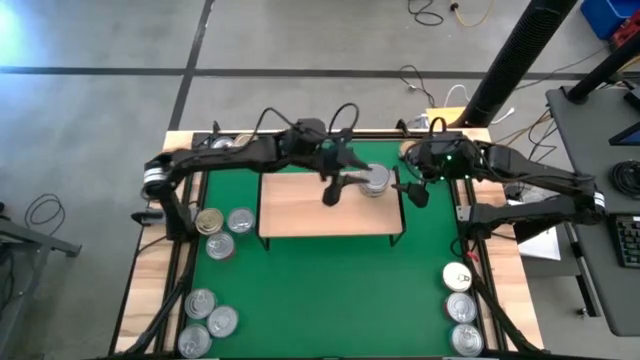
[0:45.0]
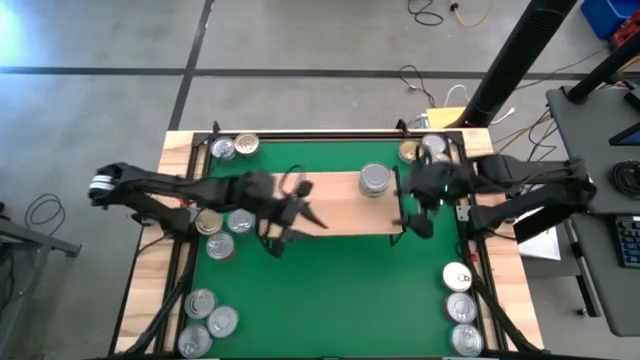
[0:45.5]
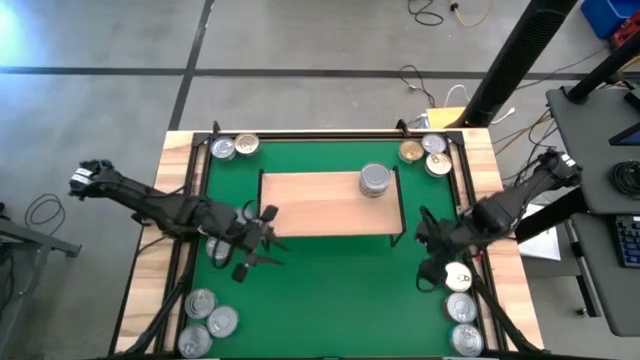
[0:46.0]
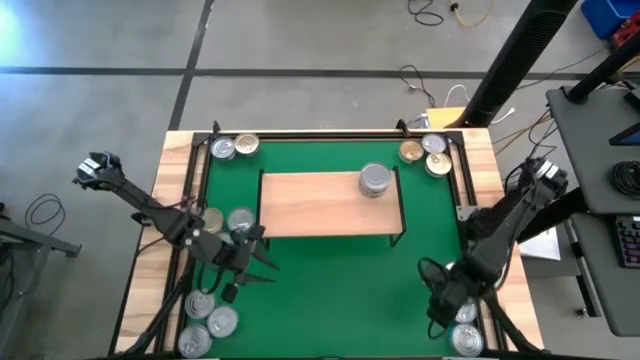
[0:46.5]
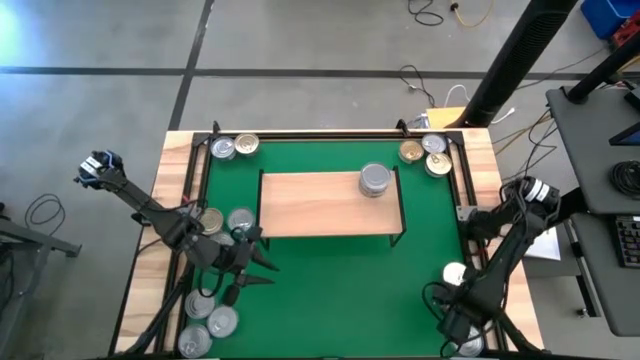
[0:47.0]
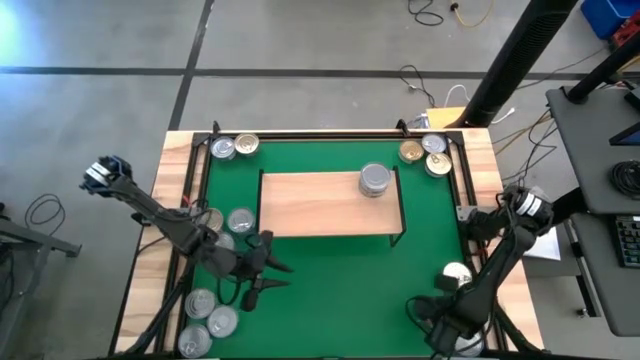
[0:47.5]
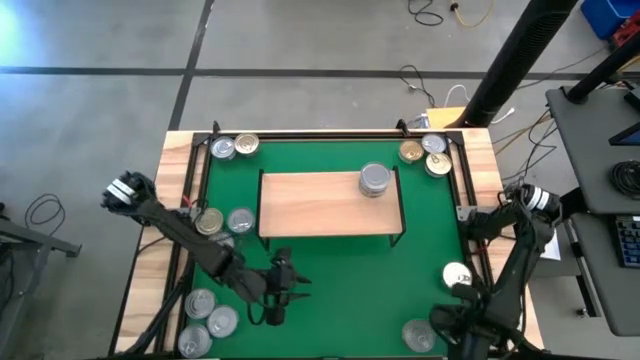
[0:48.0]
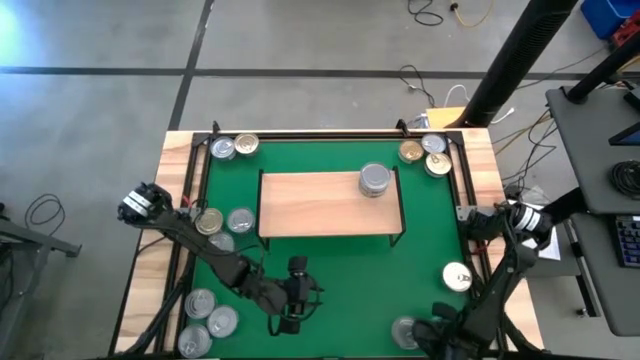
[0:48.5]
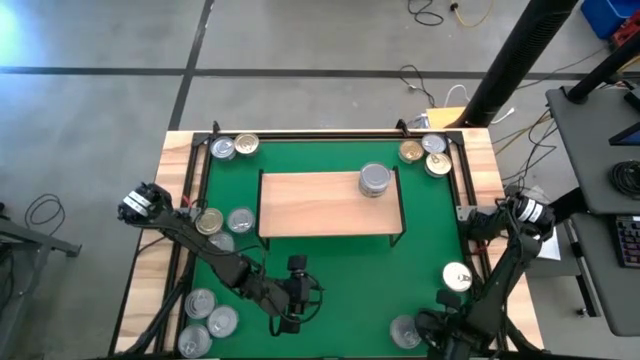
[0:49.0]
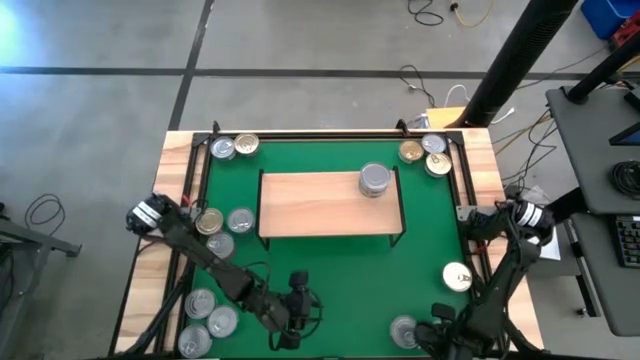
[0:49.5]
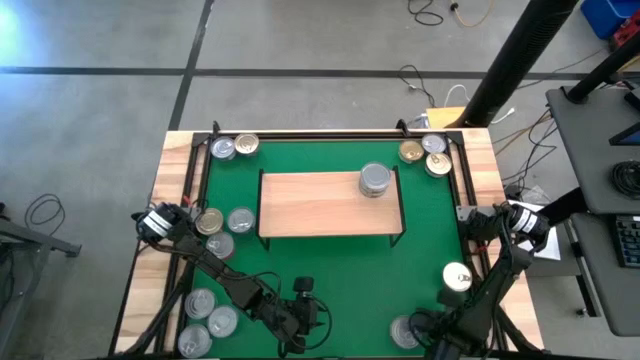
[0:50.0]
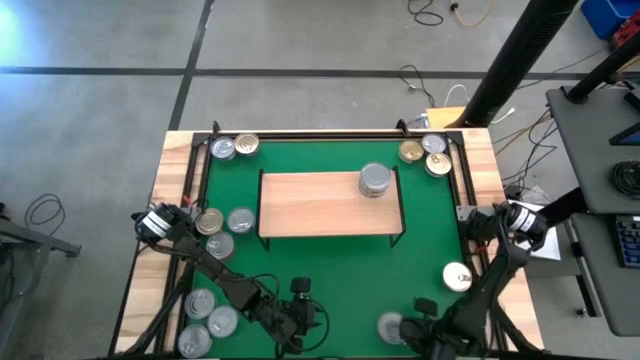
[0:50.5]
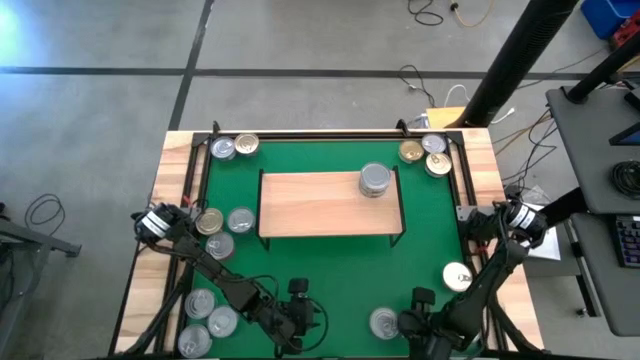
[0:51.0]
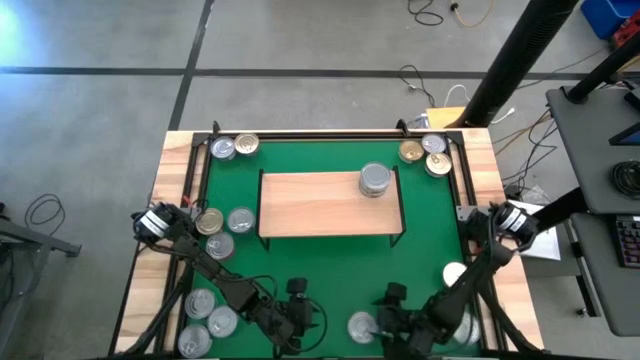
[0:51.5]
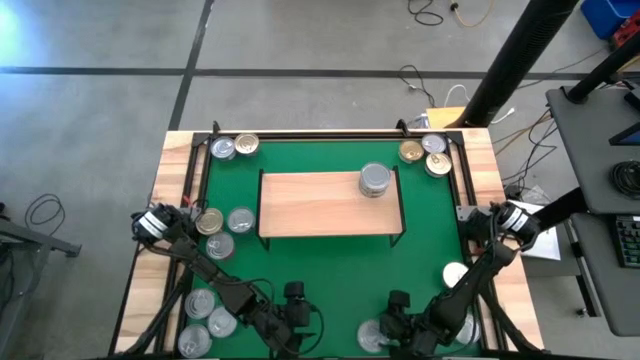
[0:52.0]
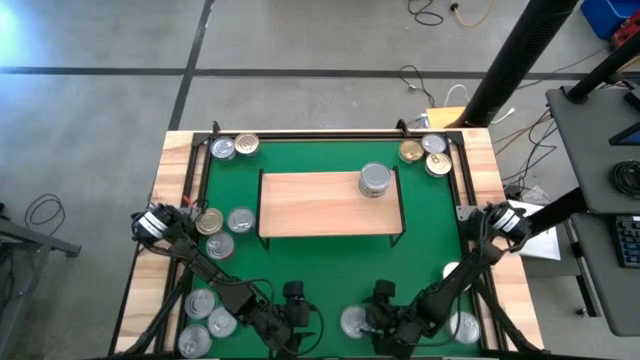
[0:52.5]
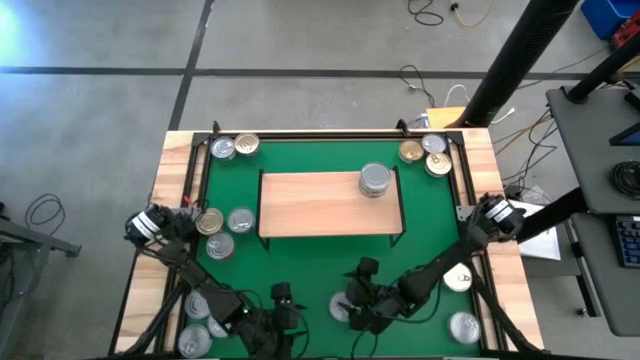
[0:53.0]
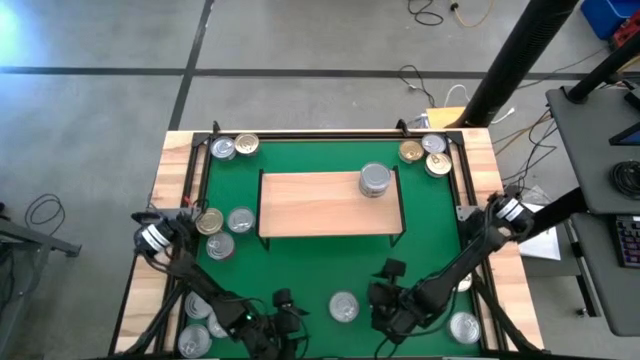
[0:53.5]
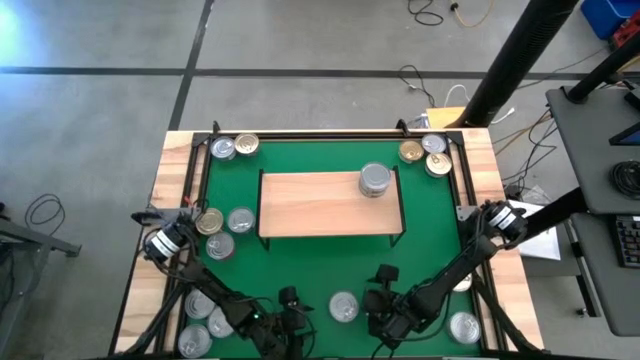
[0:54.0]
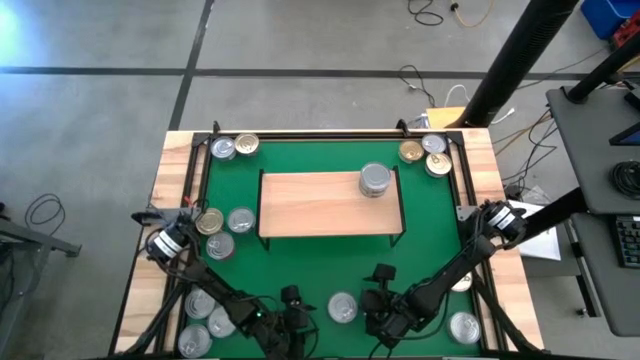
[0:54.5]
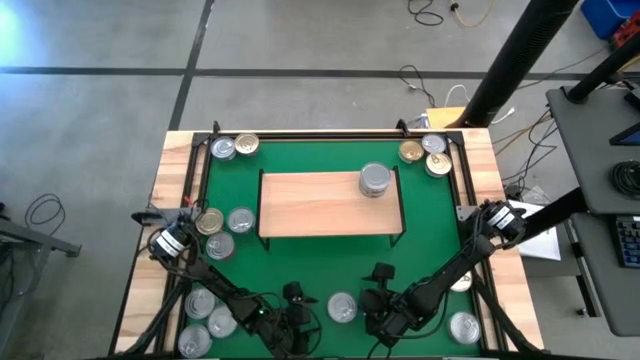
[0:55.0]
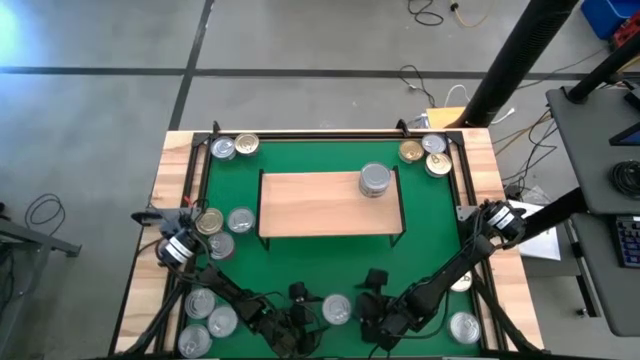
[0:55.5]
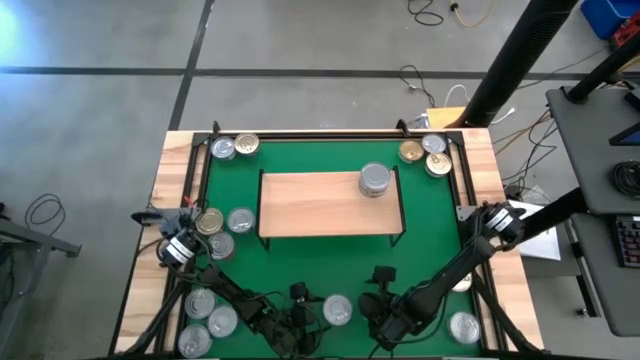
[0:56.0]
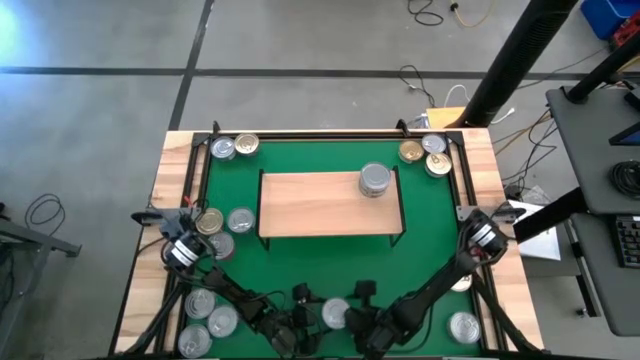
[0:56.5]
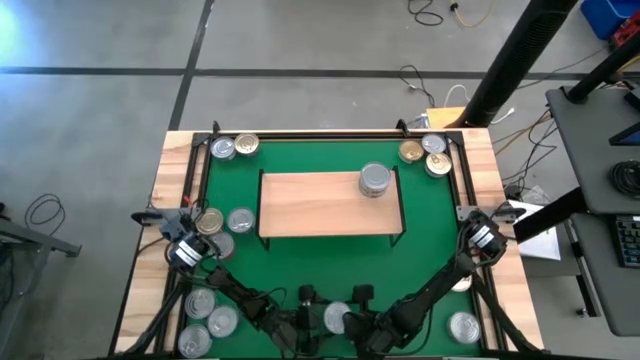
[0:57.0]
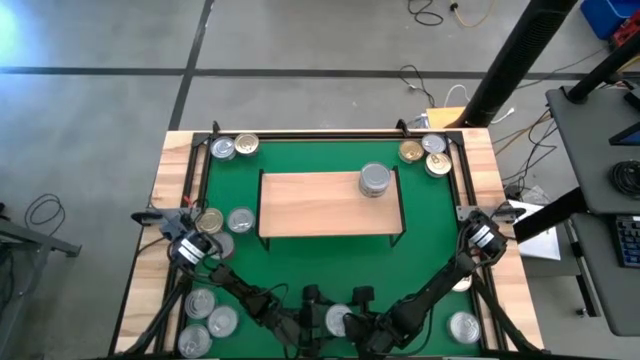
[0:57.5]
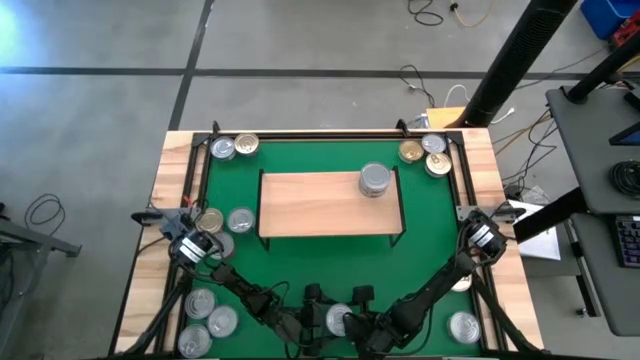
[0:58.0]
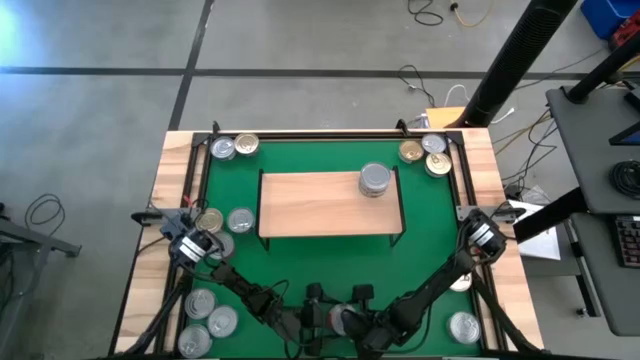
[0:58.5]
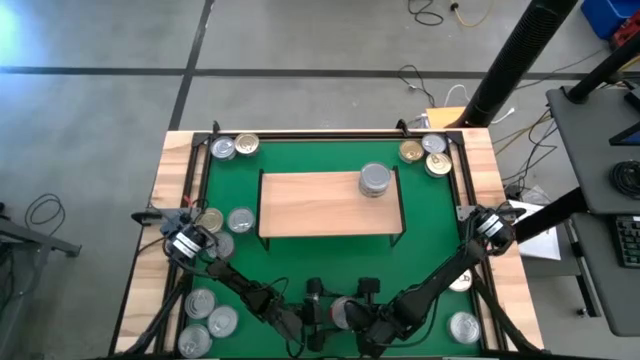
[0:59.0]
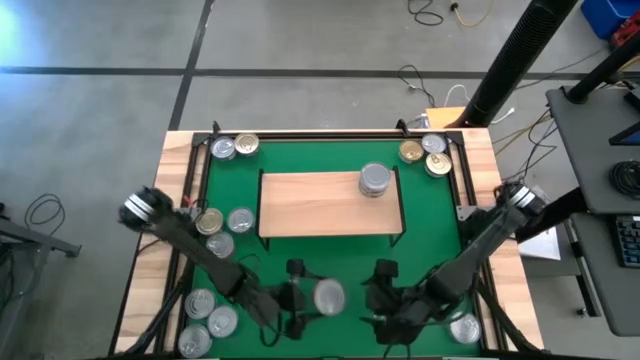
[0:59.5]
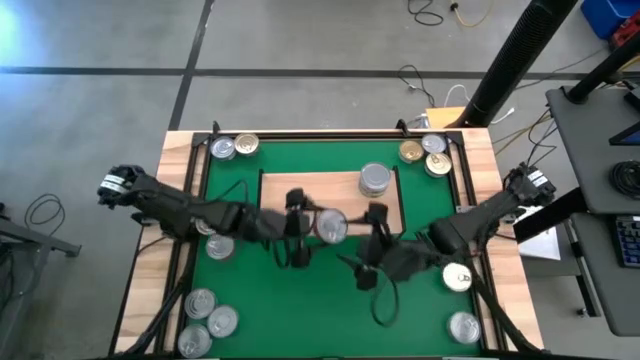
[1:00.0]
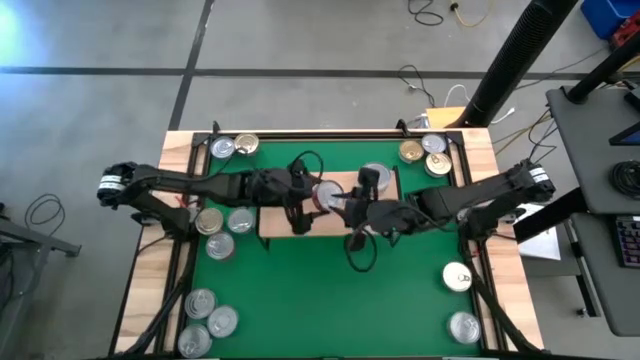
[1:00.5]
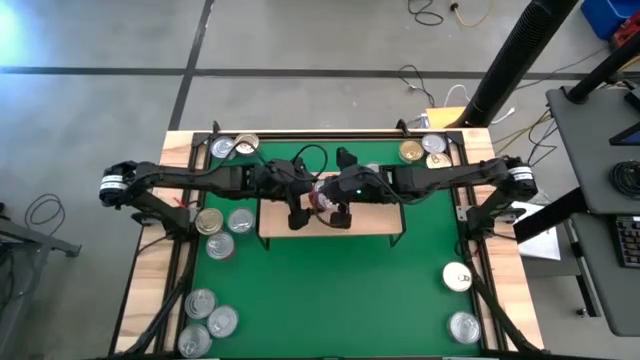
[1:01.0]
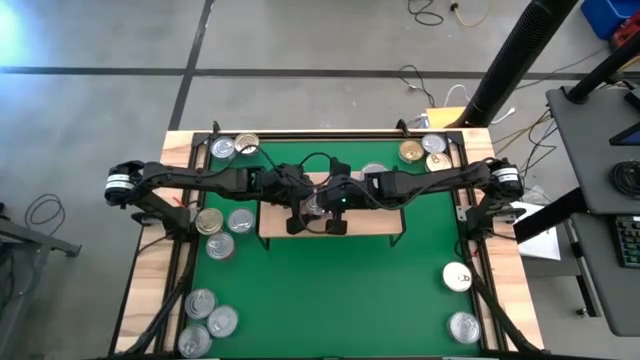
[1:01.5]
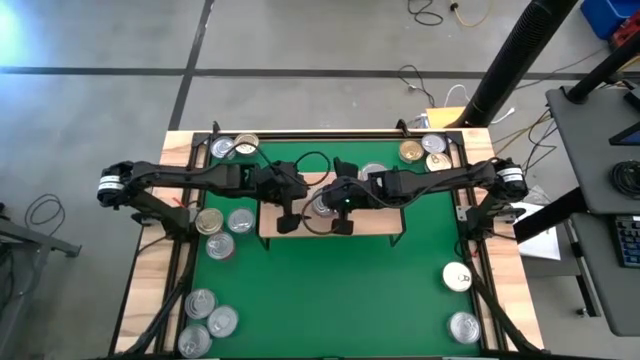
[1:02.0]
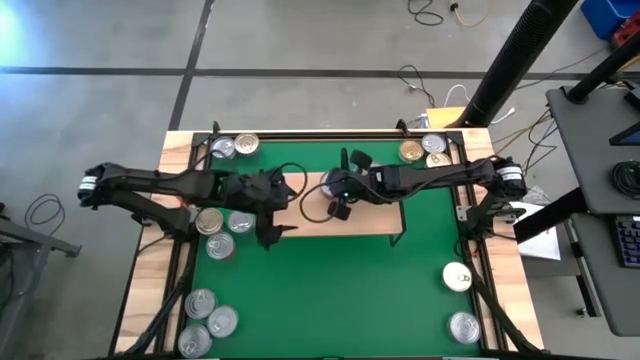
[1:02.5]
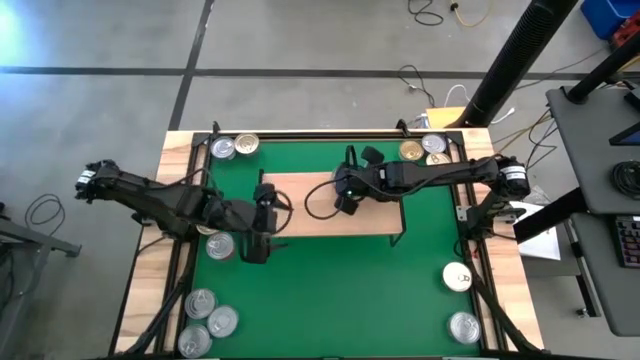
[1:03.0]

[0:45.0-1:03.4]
Task: Stack canned seafood by type on shelf
Put the bottom right red tuna can on the shelf
